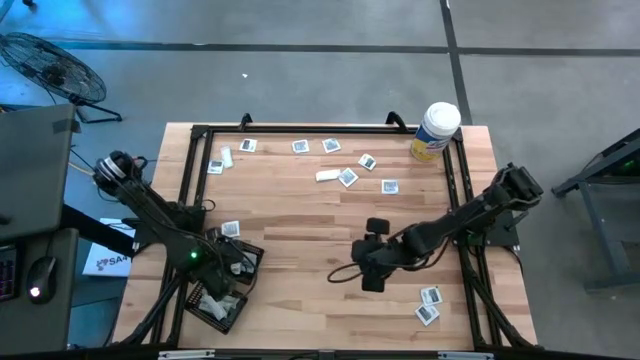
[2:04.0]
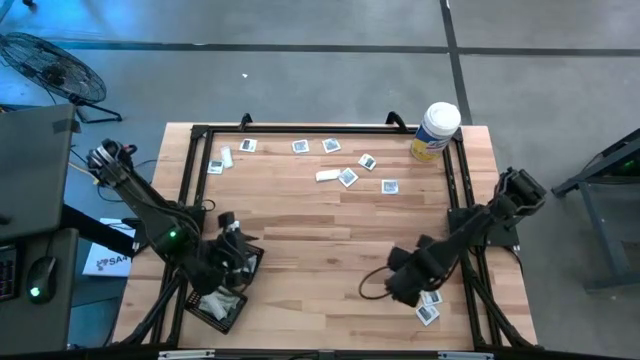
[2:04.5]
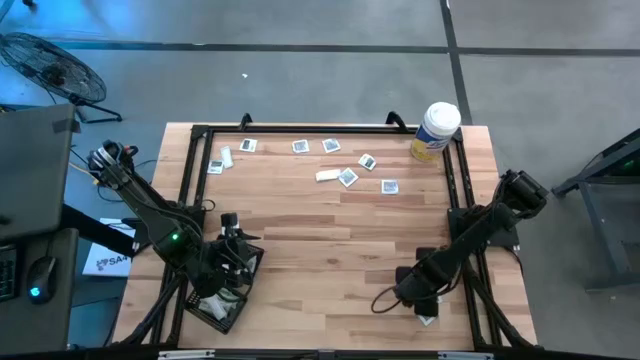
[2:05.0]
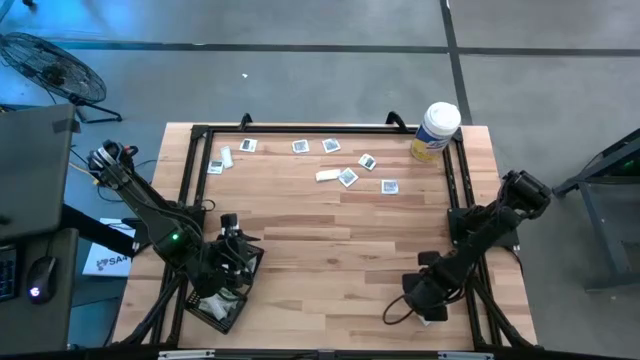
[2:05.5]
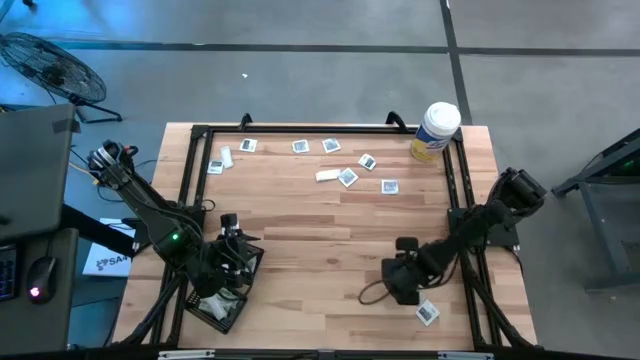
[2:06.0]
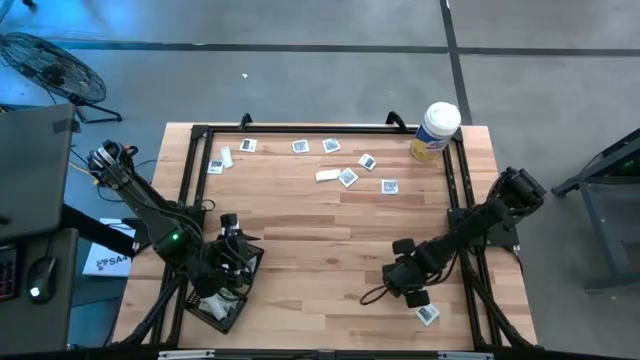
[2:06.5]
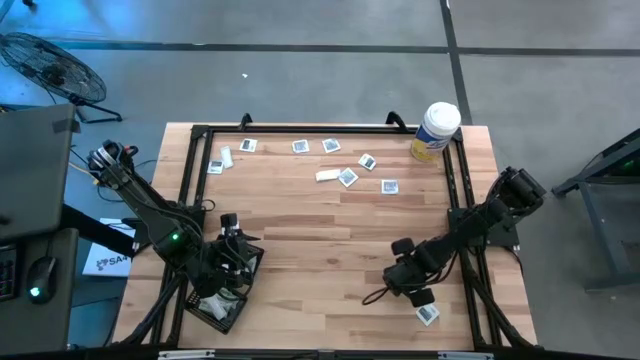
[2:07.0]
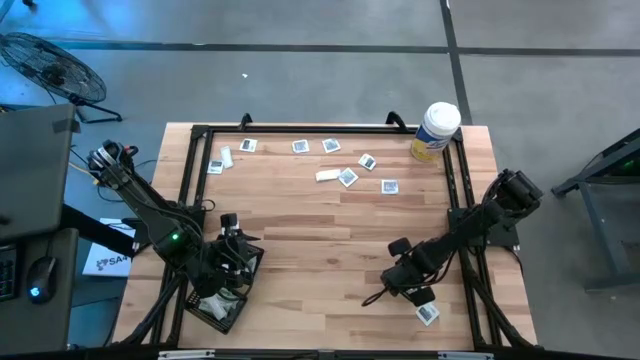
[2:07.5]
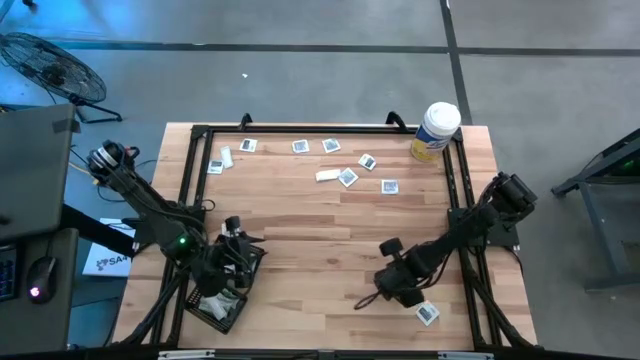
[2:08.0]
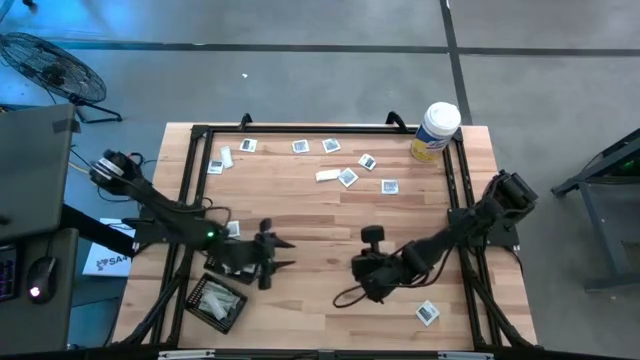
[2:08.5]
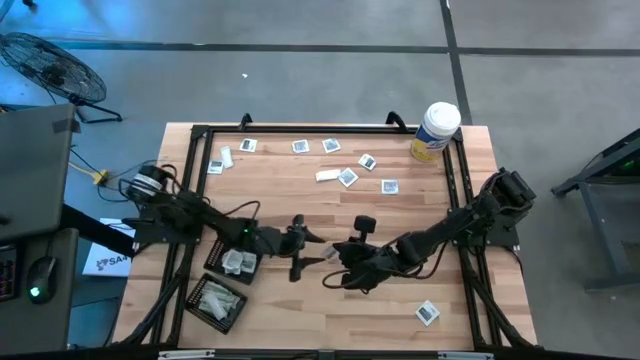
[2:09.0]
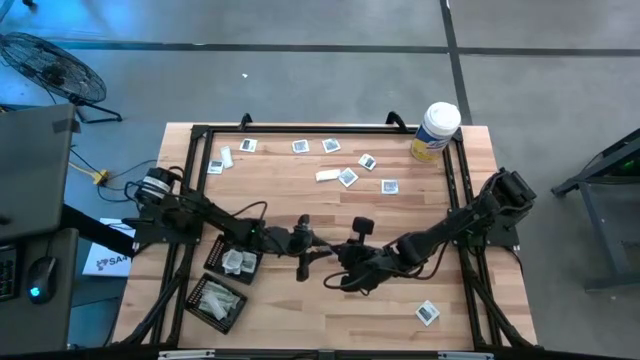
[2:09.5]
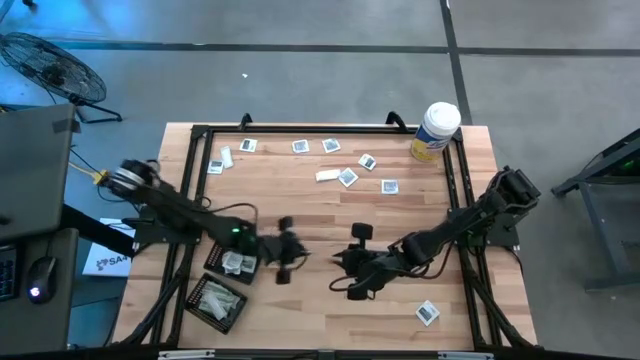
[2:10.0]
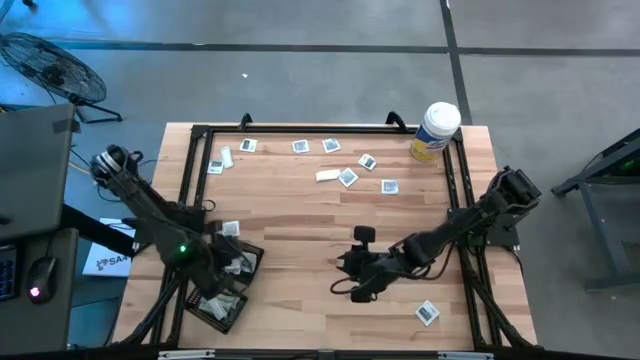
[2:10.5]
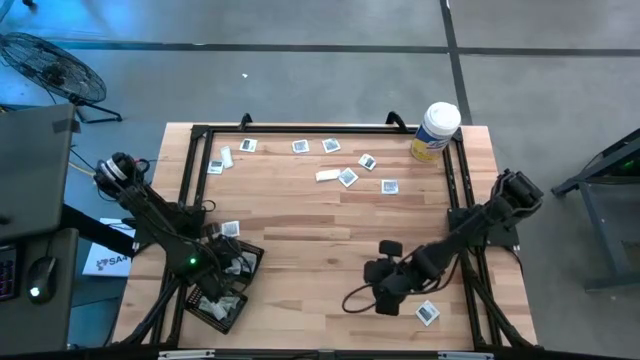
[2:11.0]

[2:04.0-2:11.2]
Task: Pick & Place First Aid Supplies
Put the towelette pack into the top black bin

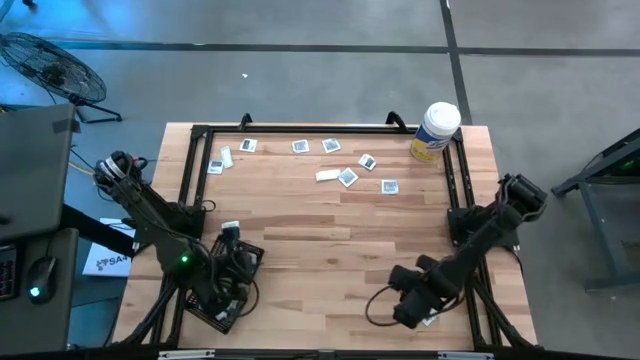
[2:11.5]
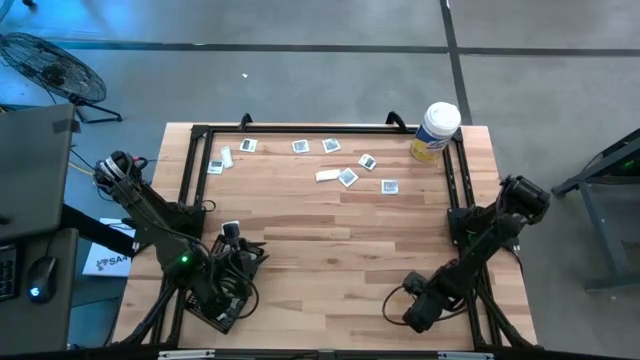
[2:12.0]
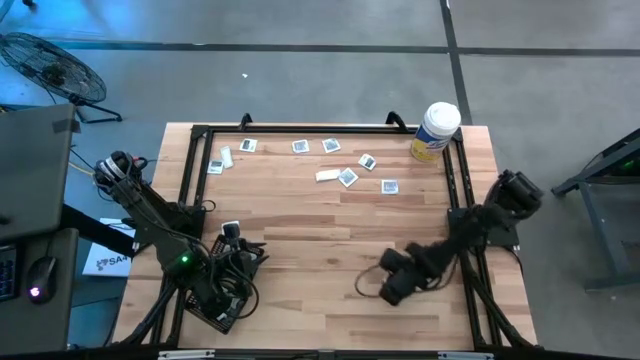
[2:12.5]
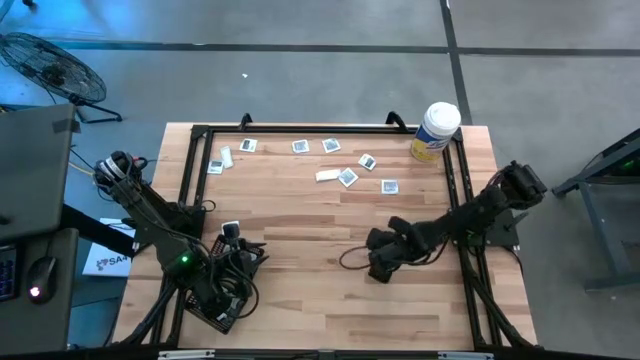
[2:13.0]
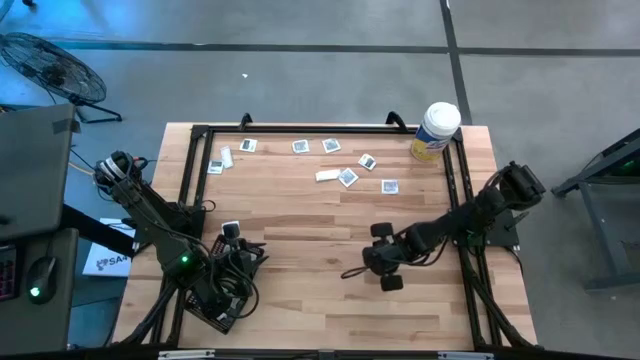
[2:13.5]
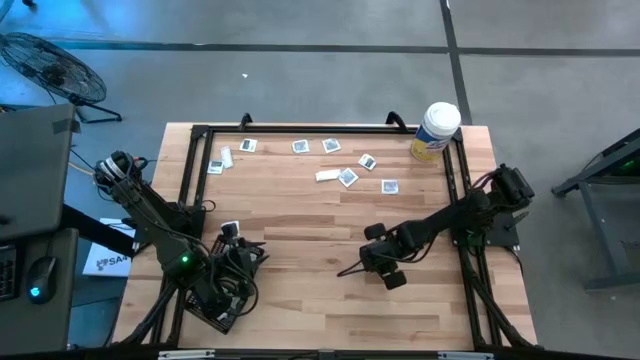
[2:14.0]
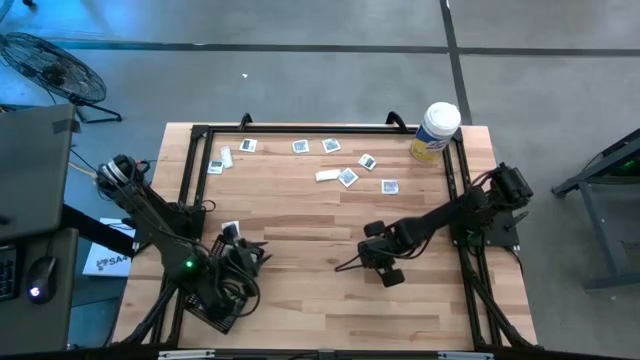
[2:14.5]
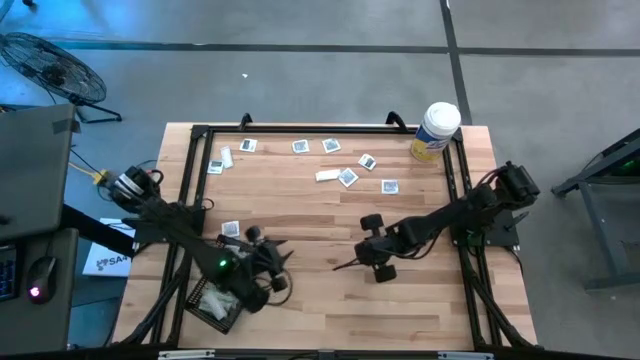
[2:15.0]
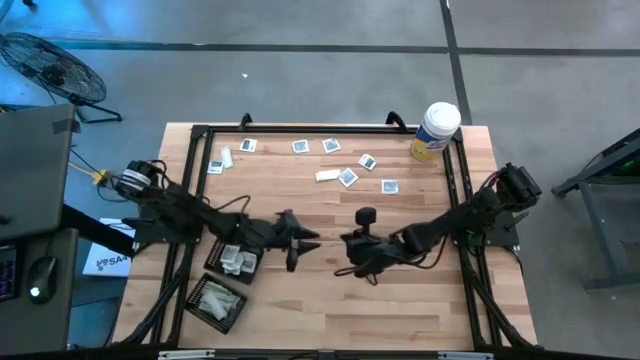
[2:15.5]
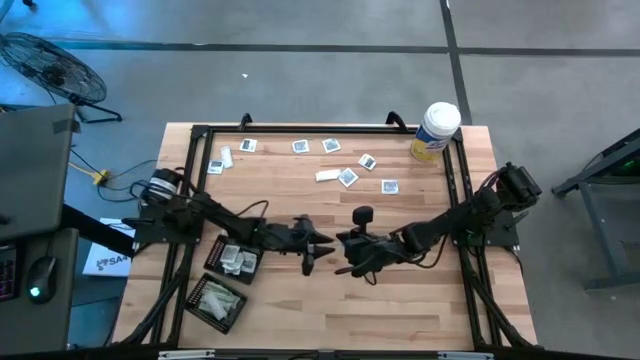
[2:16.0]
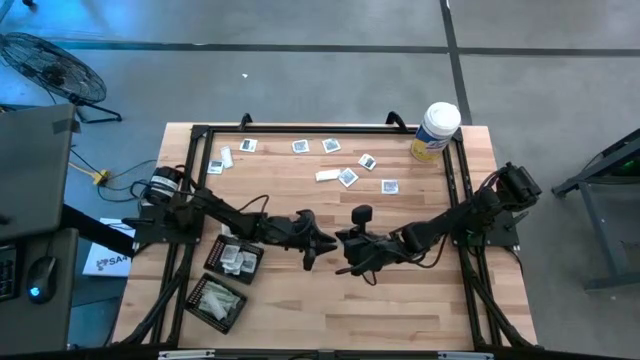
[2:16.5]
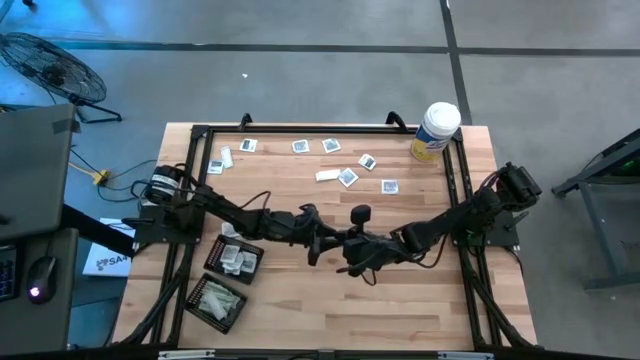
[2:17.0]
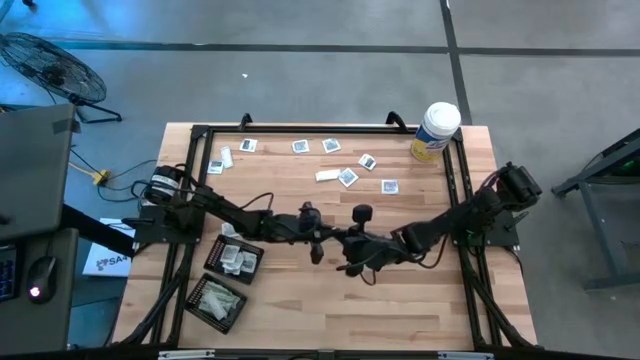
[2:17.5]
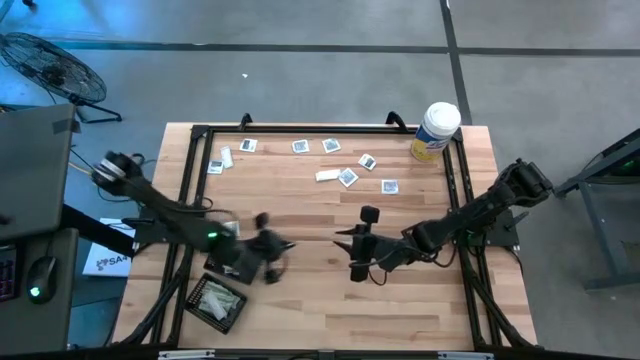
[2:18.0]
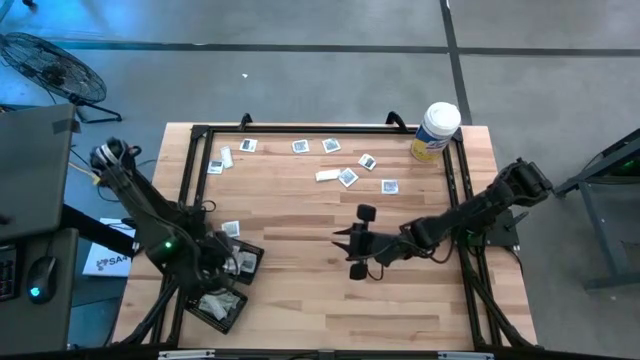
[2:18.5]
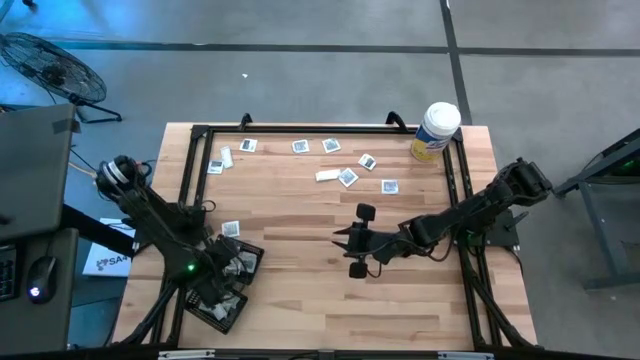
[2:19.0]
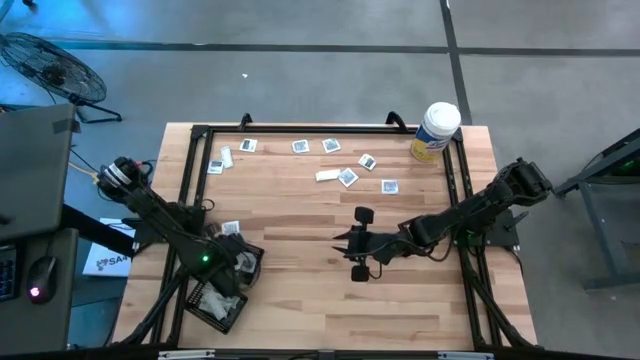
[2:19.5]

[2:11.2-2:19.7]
Put the towelette pack into the top black bin

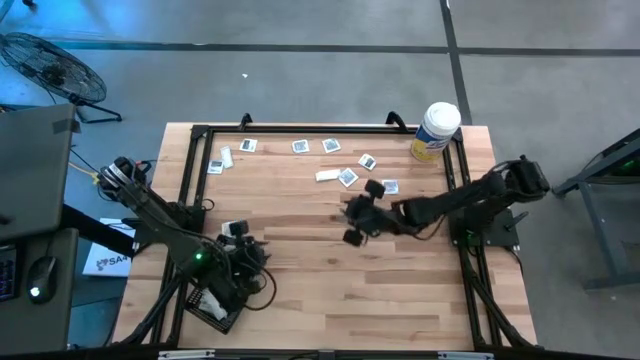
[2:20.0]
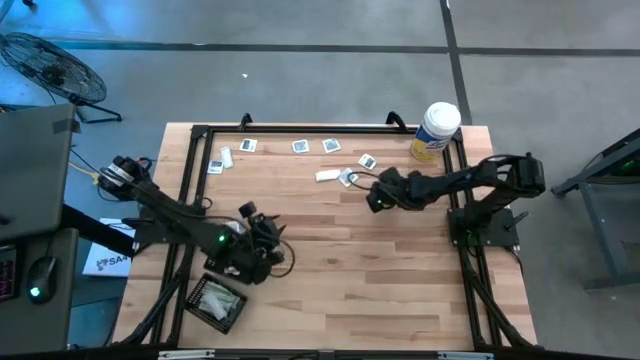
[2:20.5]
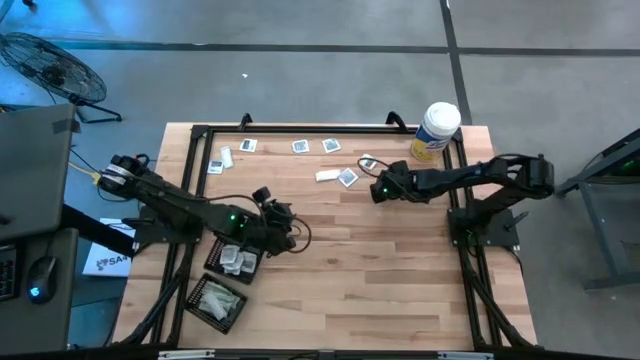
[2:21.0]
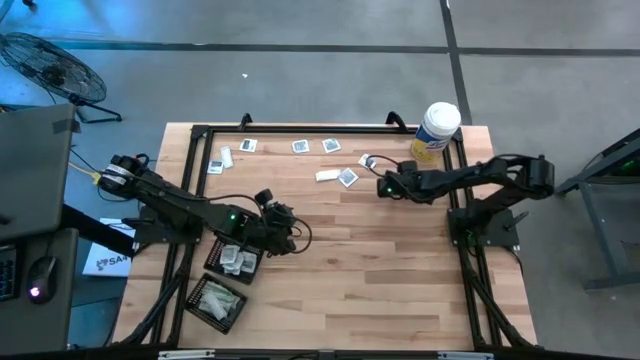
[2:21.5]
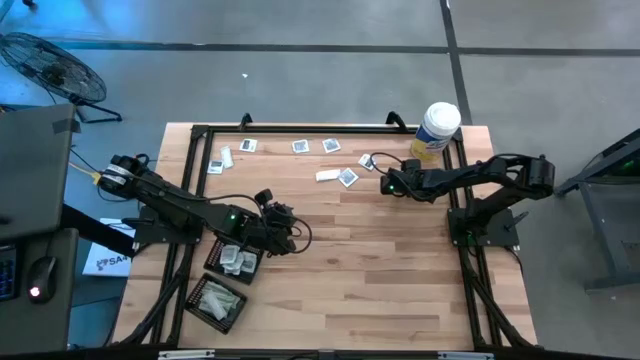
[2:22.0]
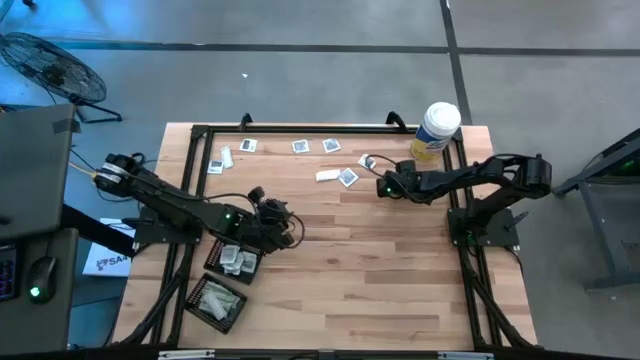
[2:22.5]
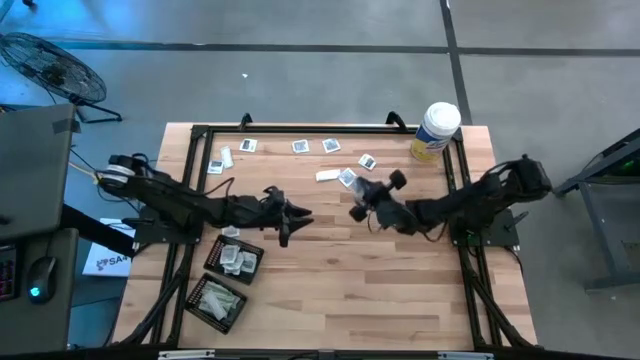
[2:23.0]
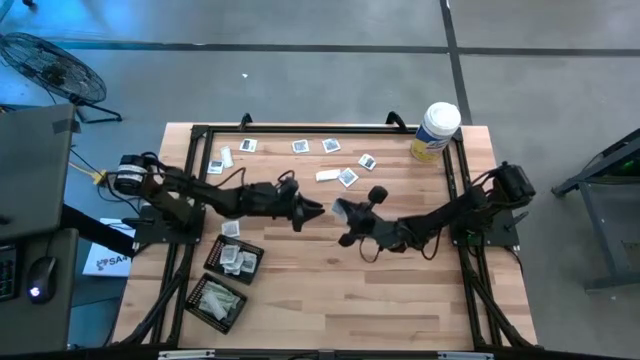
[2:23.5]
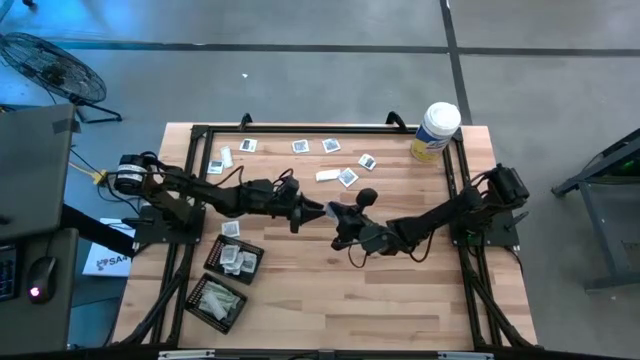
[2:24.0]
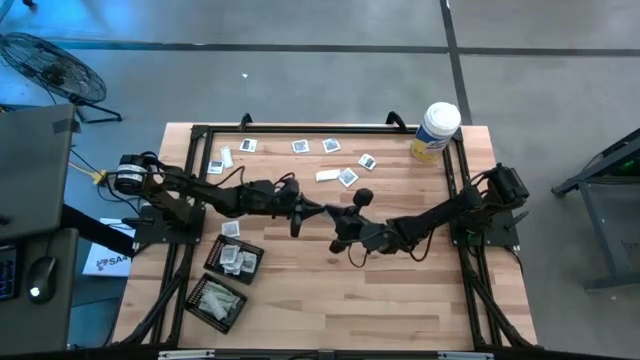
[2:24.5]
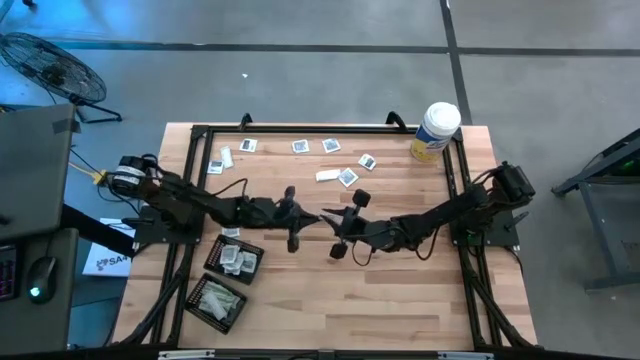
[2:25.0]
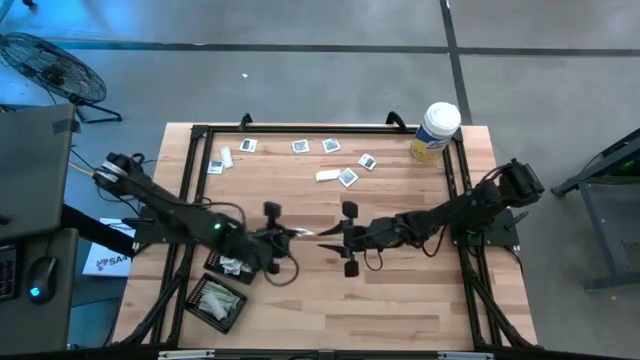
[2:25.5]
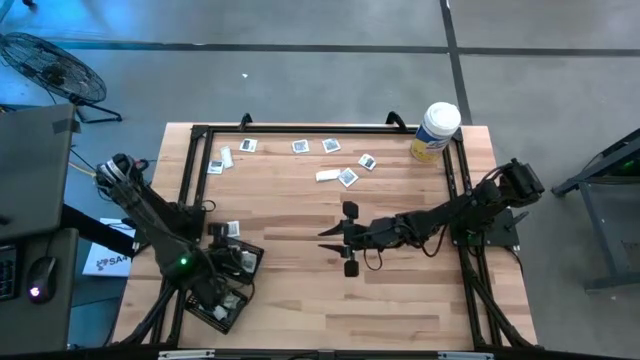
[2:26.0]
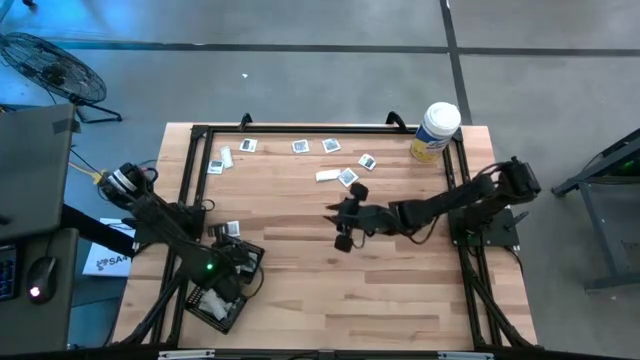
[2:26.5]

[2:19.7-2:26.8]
Put the towelette pack into the top black bin
